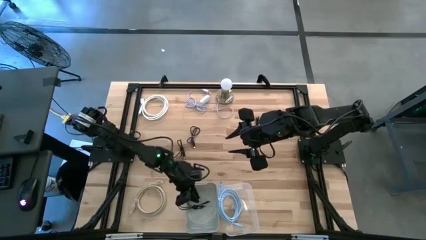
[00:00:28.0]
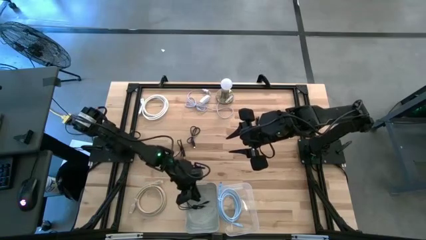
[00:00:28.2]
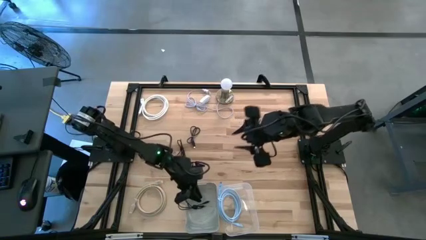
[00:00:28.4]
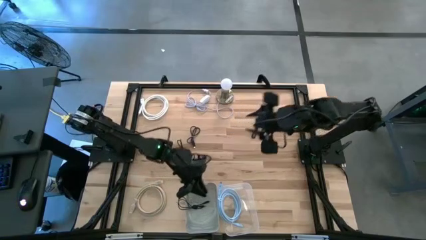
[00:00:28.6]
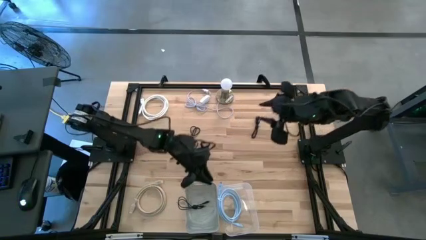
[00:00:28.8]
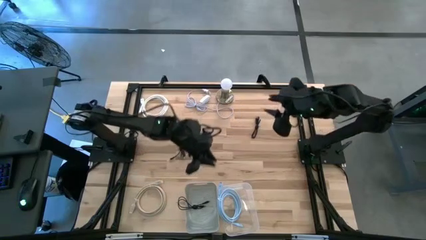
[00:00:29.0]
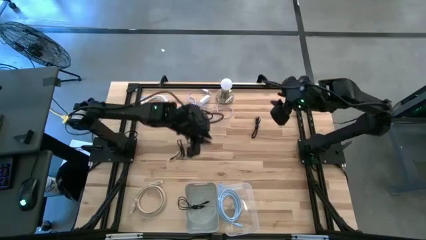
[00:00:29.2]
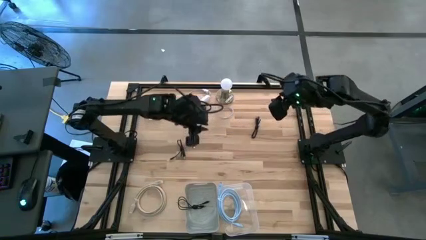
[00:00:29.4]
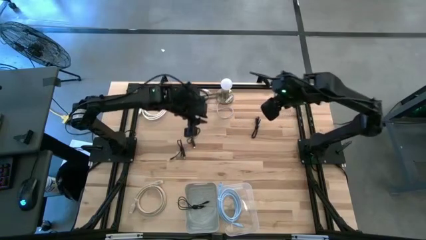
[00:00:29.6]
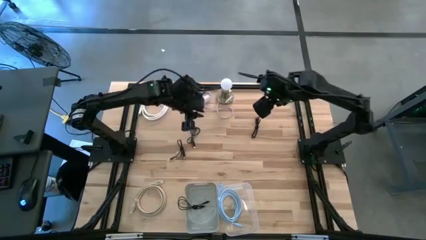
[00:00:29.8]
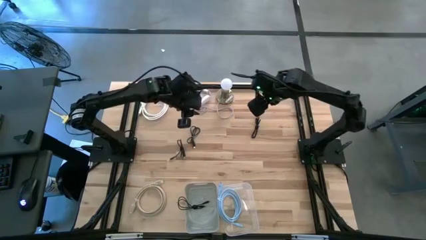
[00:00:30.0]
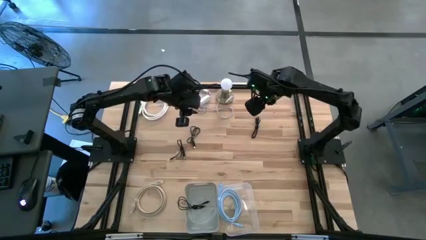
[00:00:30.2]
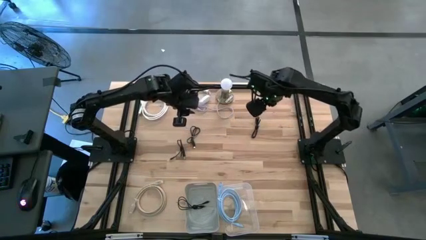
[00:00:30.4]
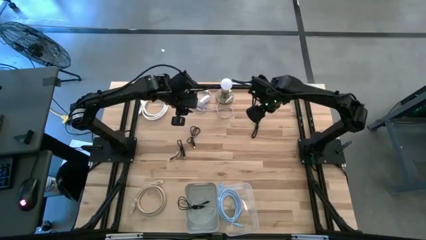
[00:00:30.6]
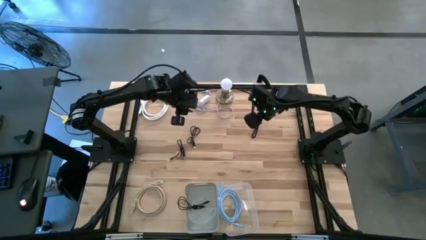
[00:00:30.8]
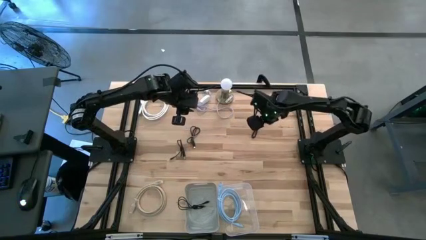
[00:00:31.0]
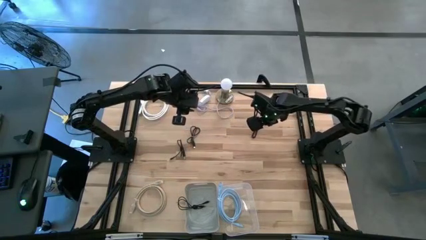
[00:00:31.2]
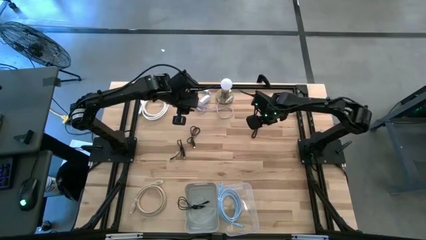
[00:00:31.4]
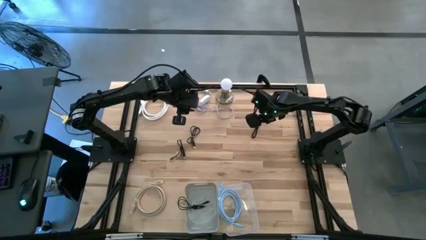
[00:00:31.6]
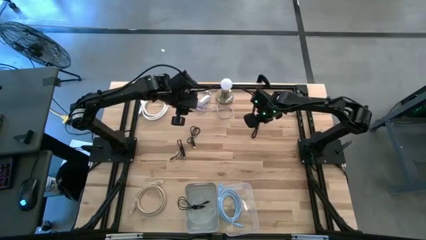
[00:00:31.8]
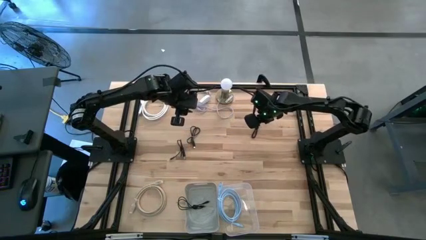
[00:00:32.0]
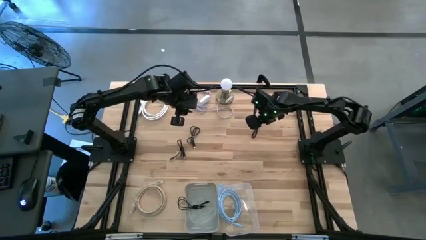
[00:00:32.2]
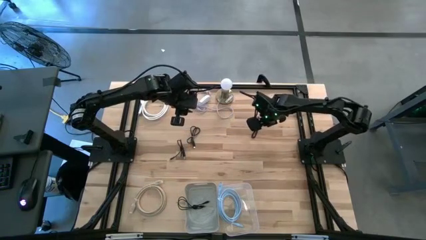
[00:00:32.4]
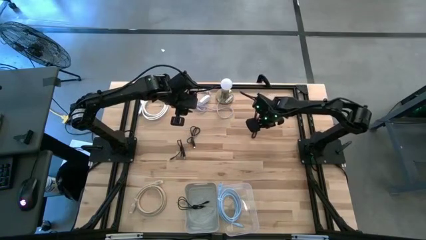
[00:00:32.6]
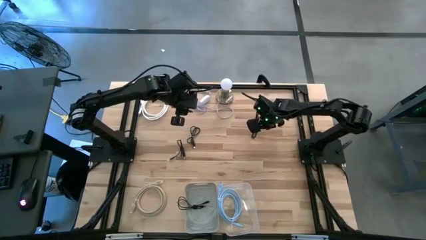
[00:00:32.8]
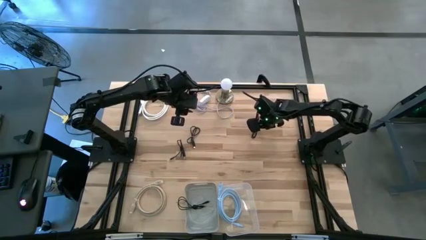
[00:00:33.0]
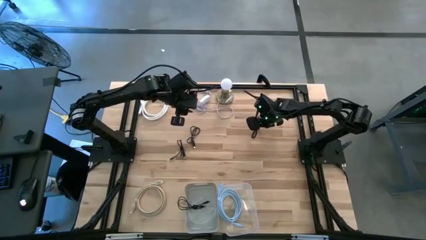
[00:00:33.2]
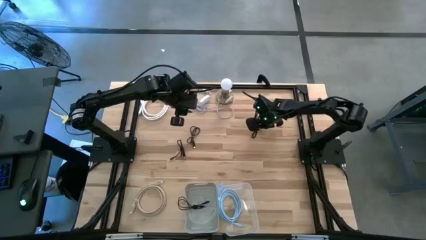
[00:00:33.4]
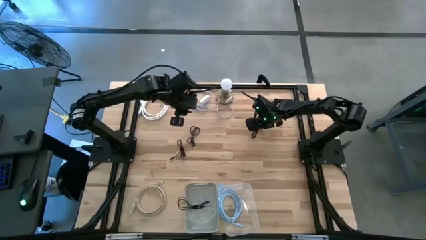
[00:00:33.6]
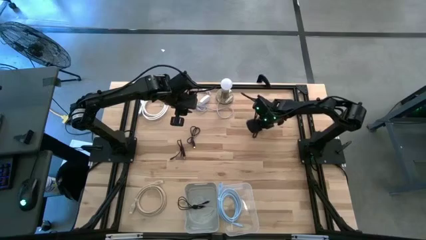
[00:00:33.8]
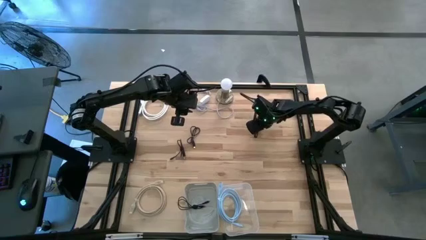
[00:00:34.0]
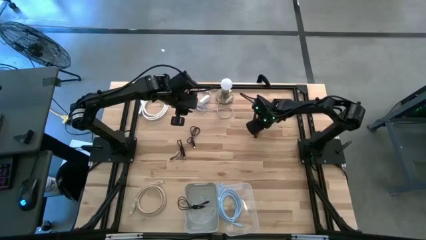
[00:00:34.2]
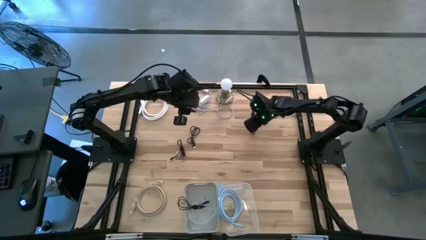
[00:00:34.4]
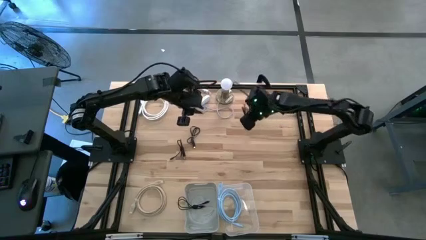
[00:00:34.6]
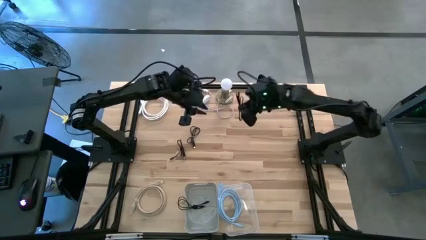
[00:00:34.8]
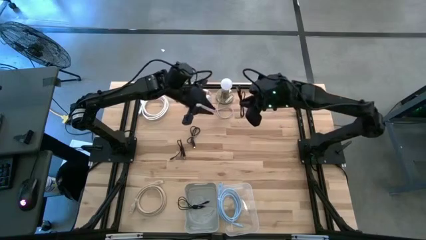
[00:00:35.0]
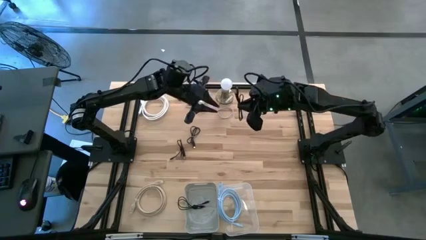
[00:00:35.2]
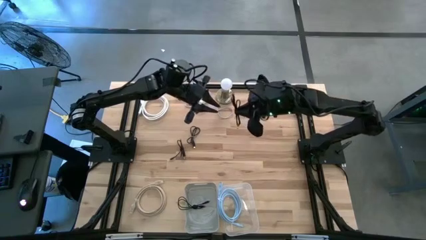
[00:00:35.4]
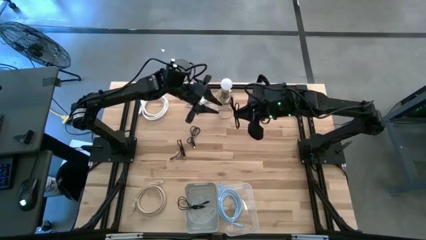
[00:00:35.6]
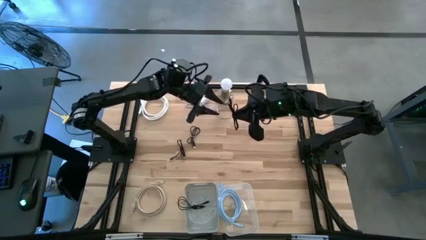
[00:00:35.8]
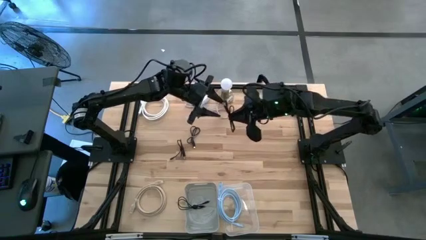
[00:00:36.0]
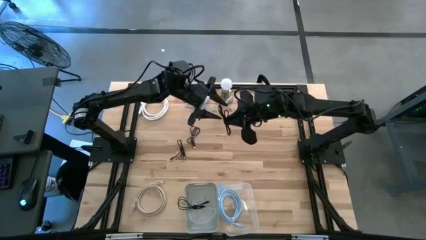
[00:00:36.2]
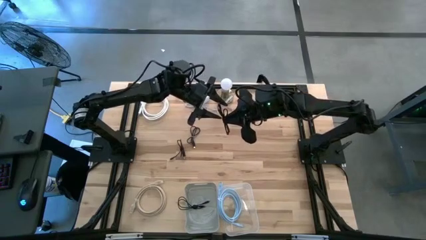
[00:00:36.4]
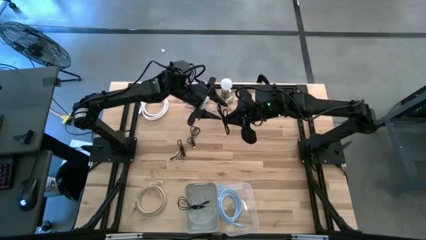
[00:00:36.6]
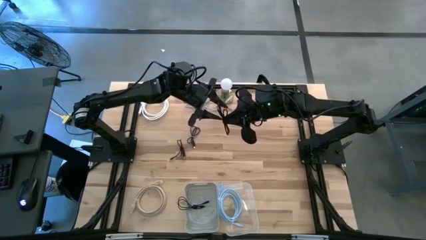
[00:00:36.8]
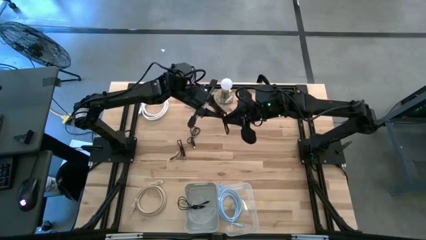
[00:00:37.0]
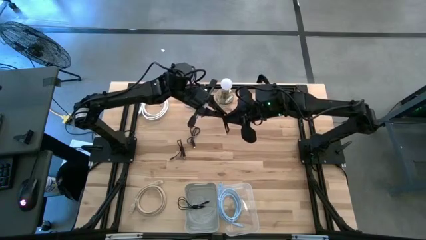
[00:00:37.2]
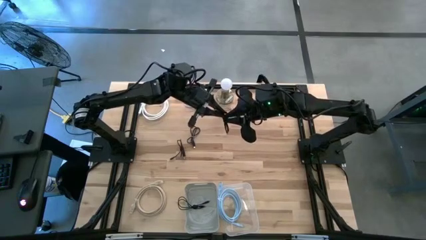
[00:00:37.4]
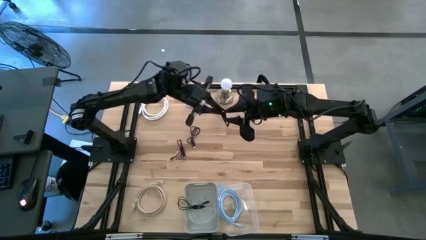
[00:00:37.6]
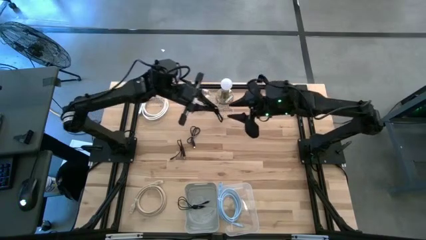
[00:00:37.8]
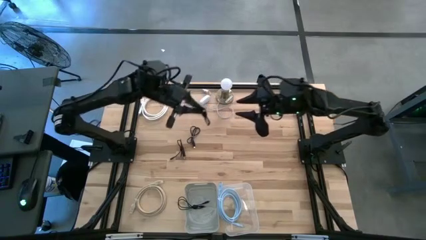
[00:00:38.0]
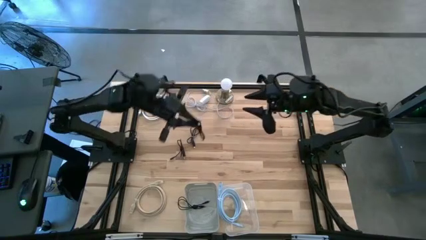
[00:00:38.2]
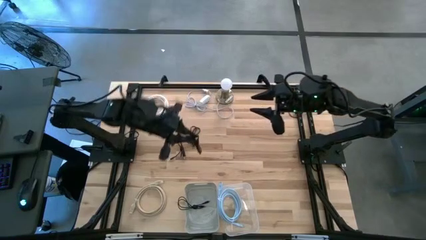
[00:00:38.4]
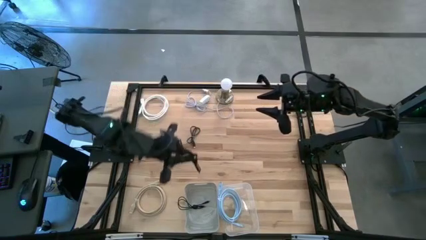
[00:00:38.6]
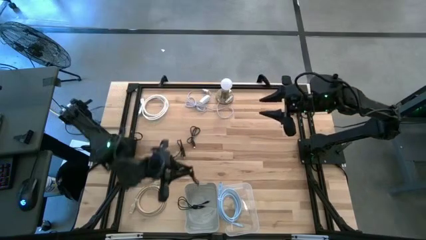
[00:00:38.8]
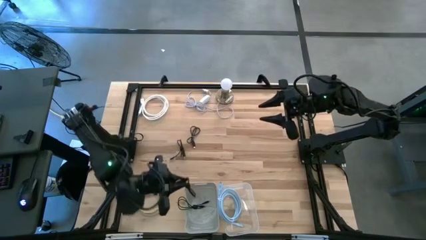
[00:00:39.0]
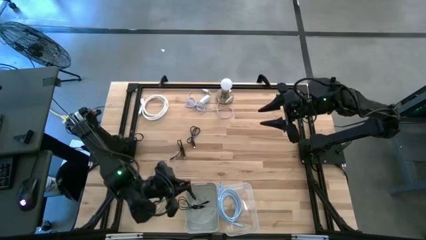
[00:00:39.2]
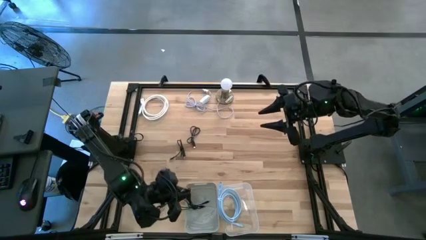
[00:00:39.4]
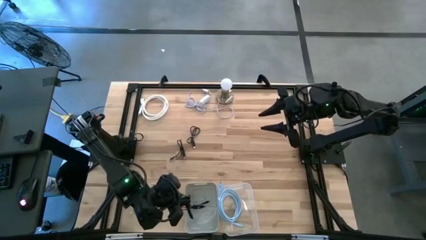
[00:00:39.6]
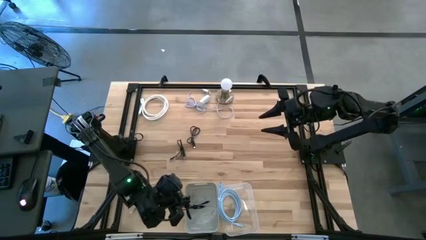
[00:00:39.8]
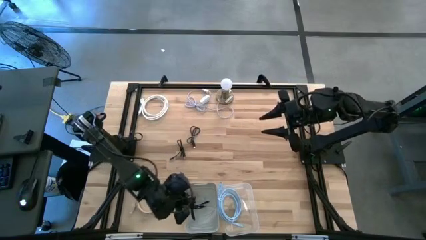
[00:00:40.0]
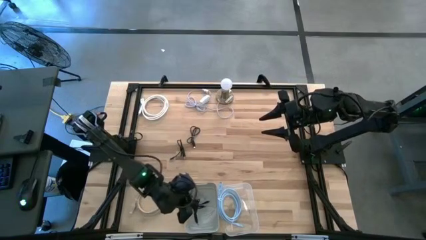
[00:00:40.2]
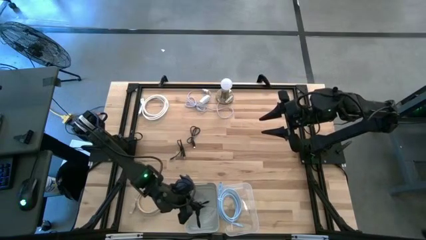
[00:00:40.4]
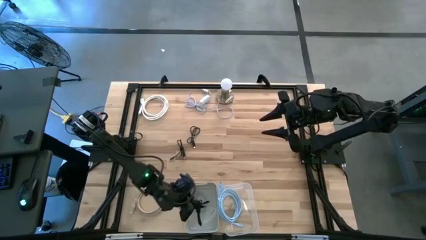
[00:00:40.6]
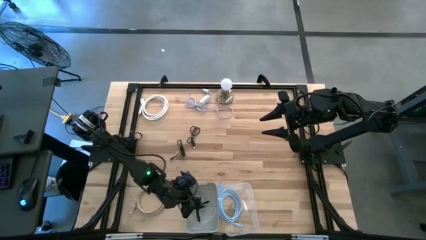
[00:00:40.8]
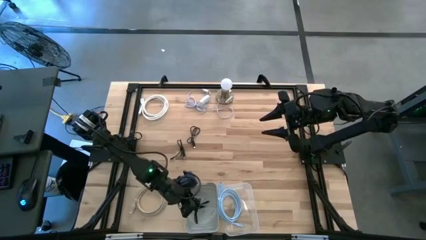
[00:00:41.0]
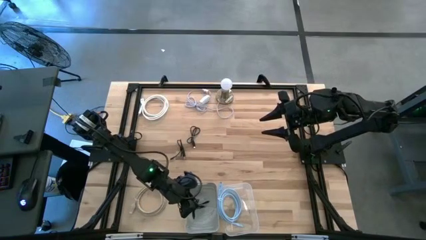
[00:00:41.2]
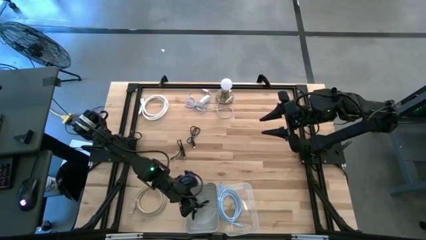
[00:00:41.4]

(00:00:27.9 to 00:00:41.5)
Task: Pick & Place USB Port
Put the black charger cable into the gray bin
